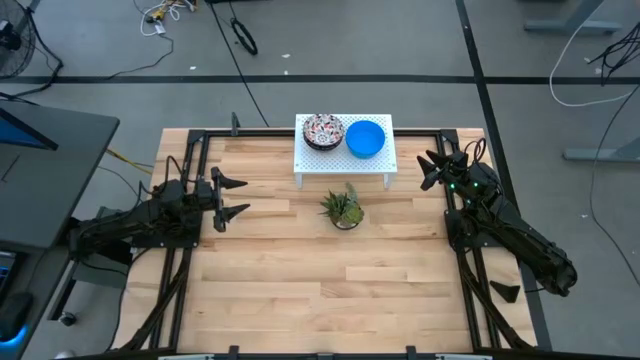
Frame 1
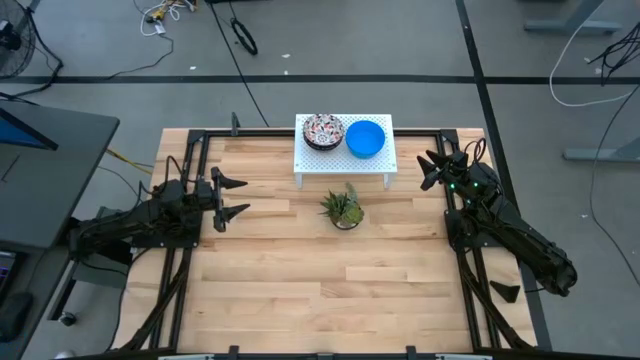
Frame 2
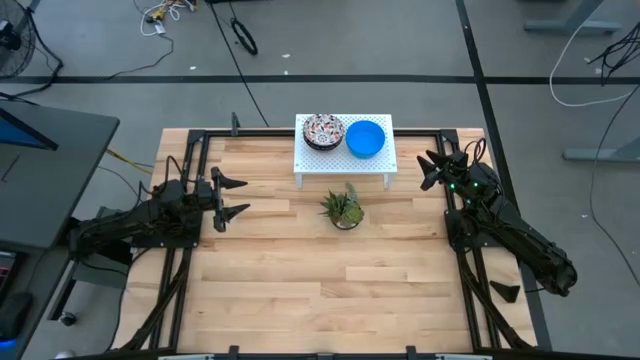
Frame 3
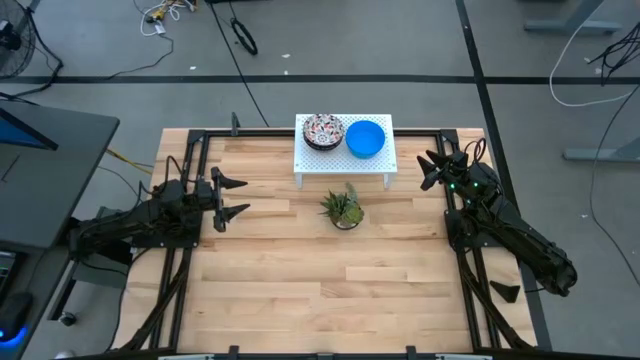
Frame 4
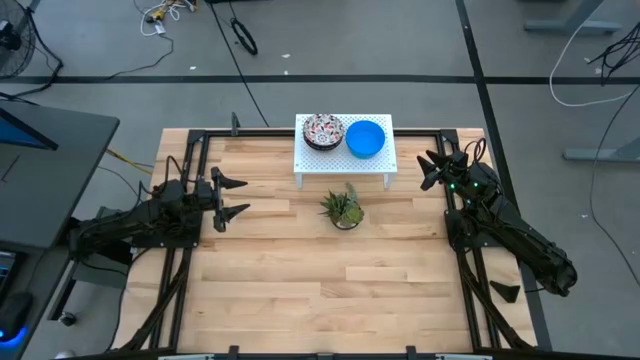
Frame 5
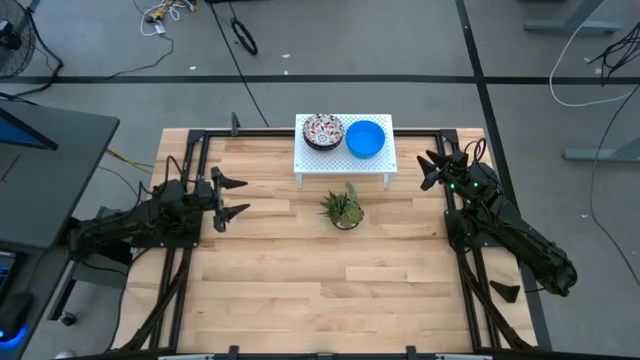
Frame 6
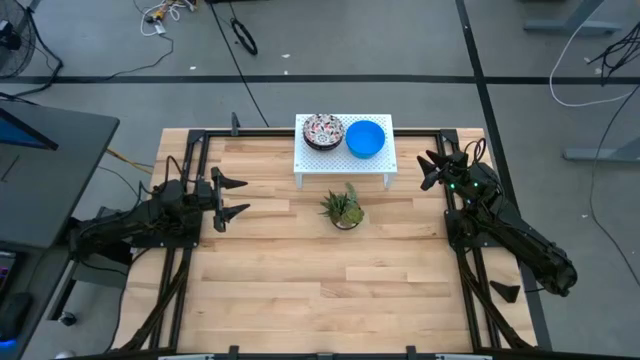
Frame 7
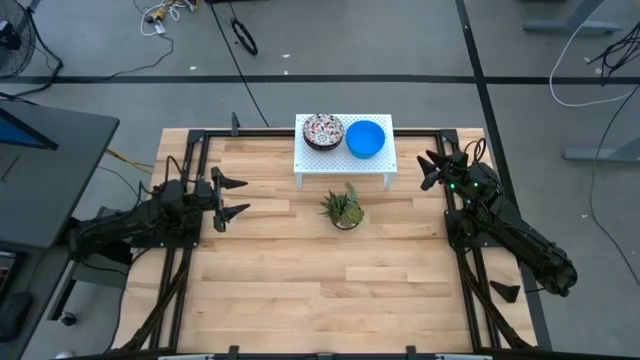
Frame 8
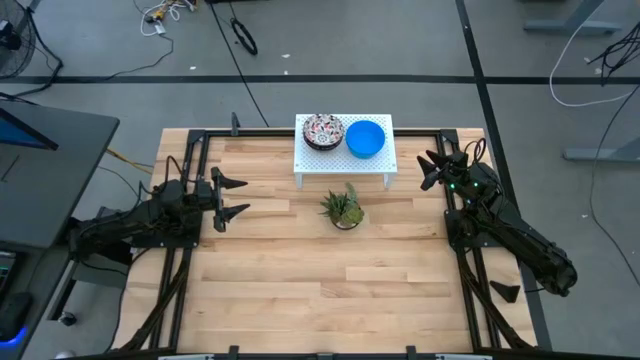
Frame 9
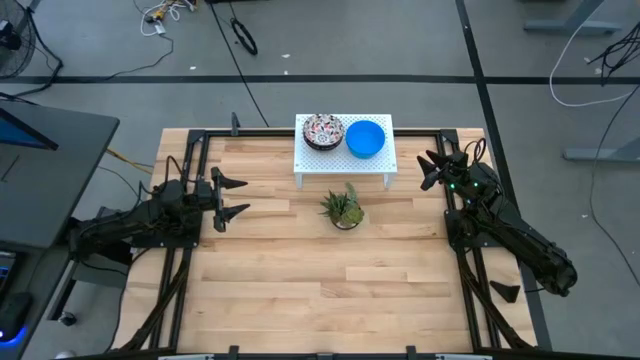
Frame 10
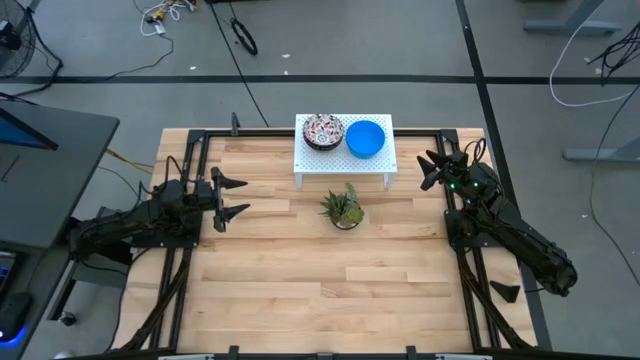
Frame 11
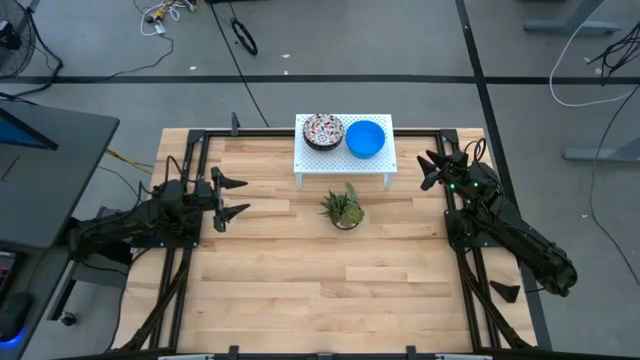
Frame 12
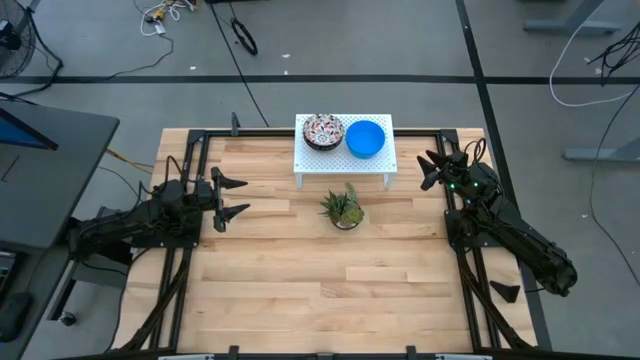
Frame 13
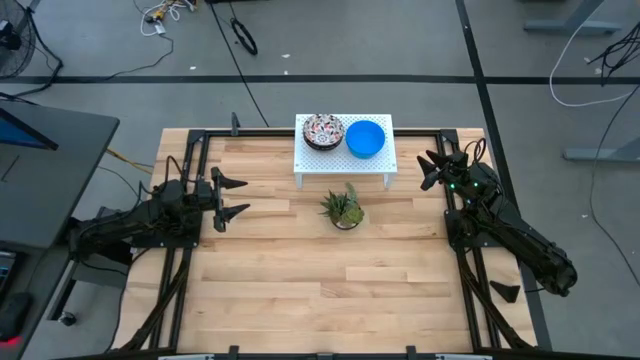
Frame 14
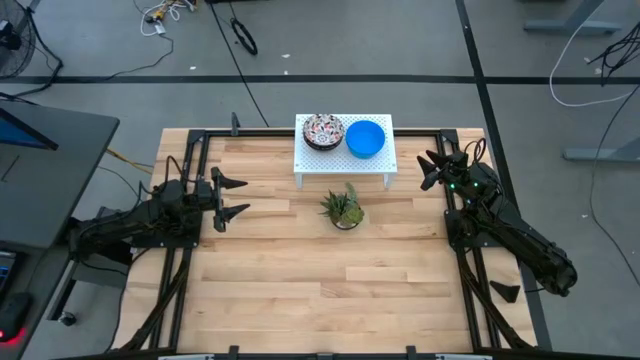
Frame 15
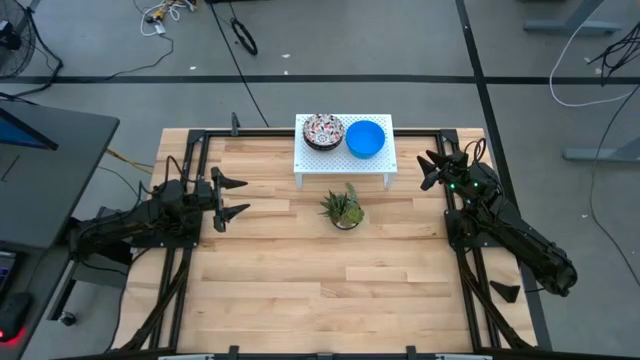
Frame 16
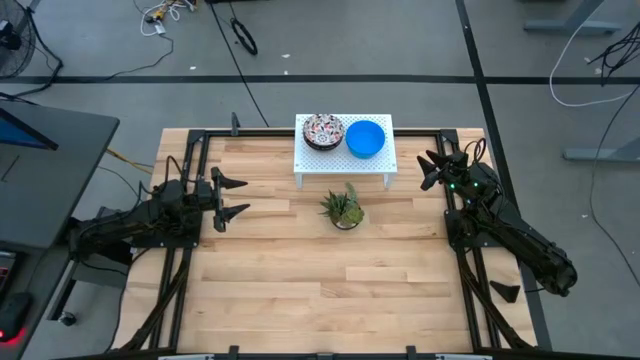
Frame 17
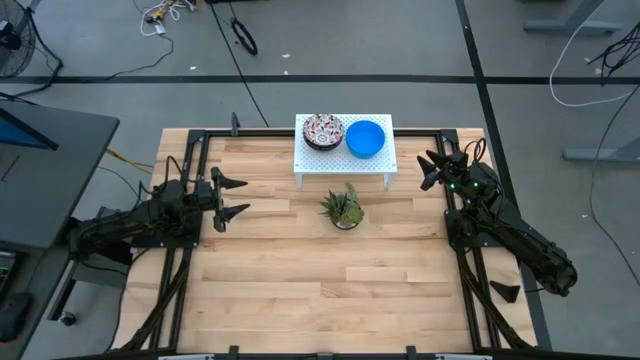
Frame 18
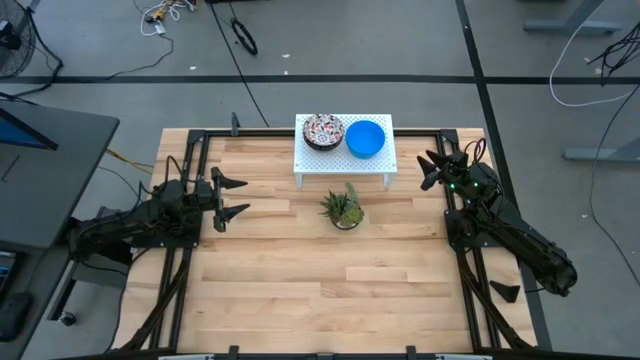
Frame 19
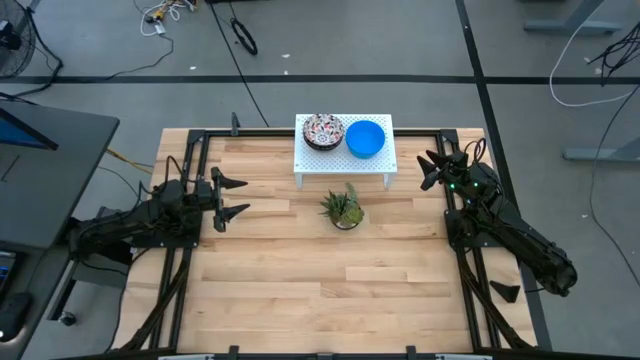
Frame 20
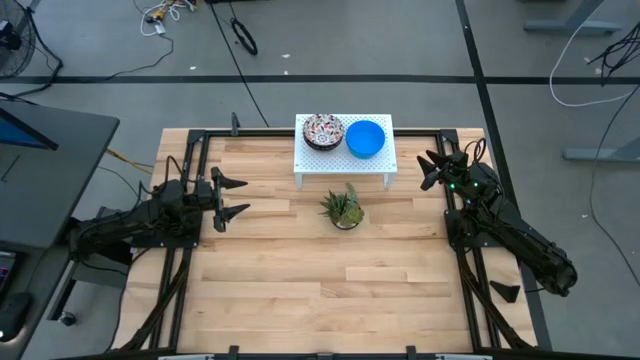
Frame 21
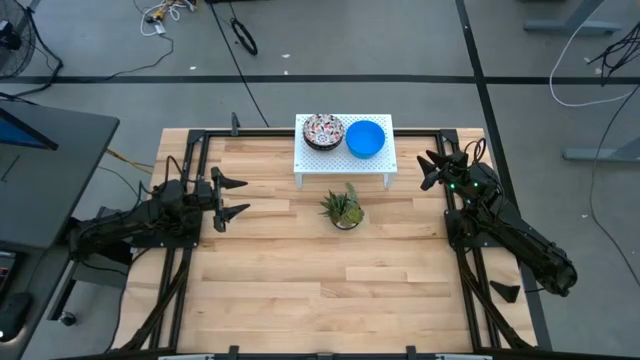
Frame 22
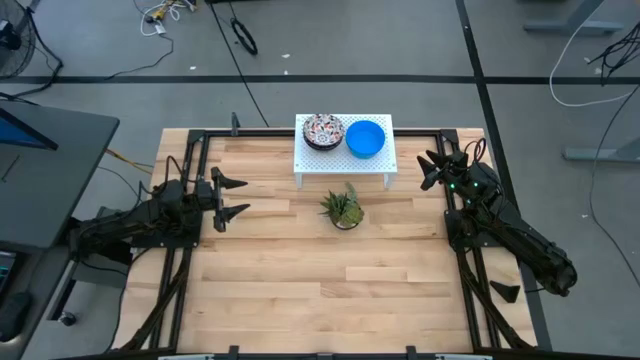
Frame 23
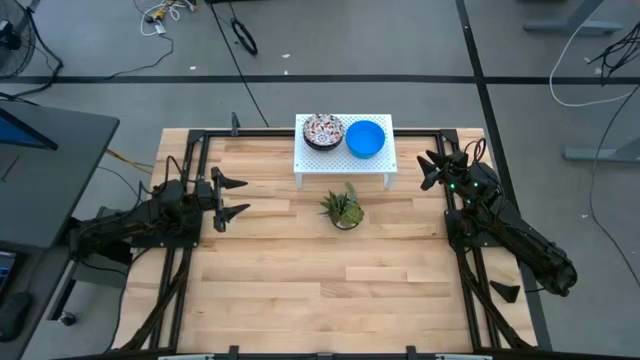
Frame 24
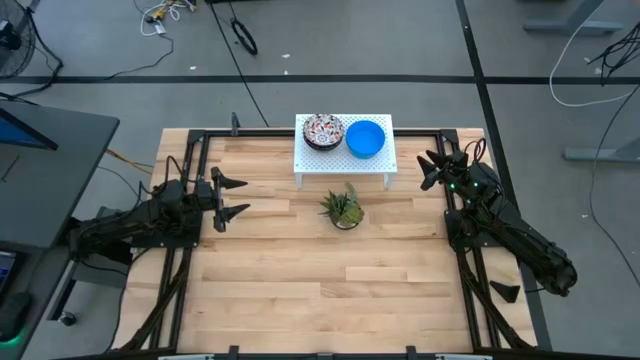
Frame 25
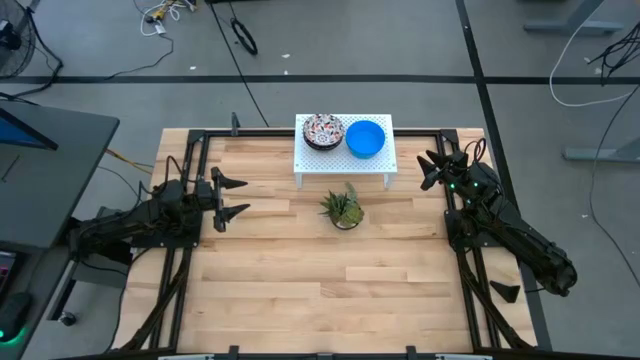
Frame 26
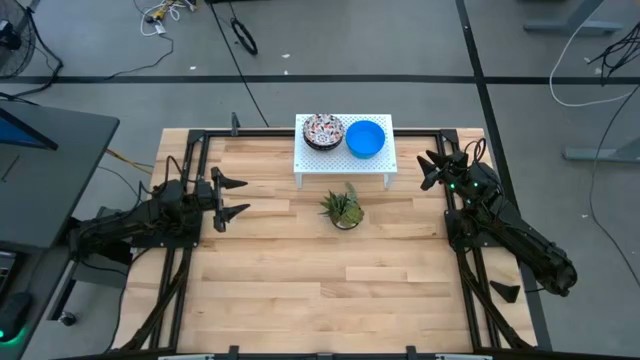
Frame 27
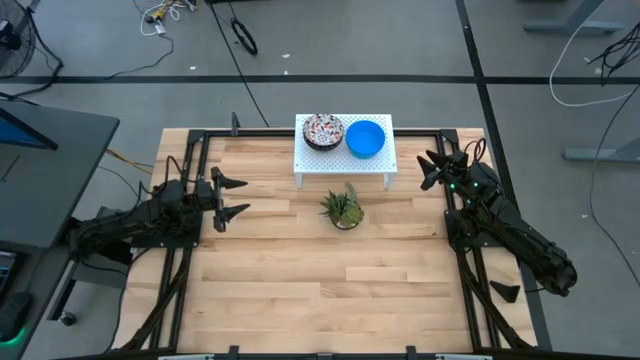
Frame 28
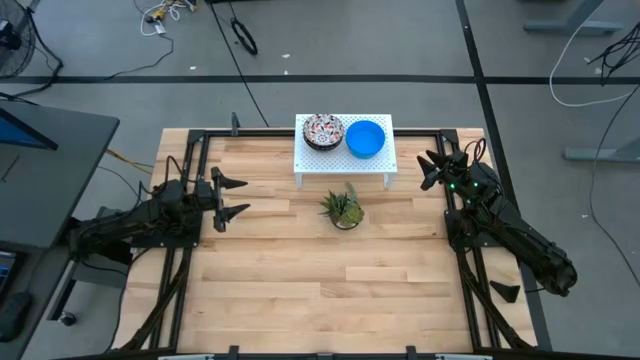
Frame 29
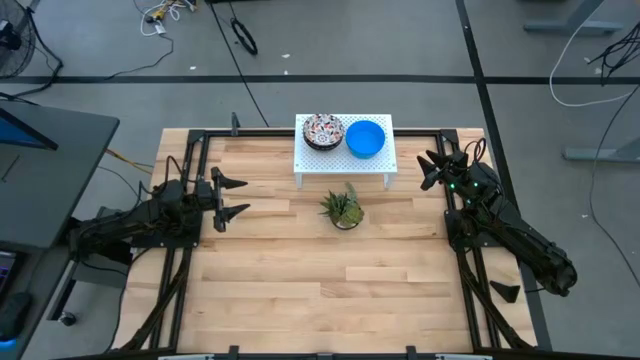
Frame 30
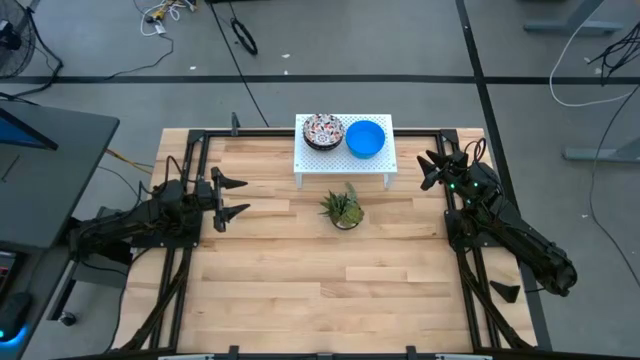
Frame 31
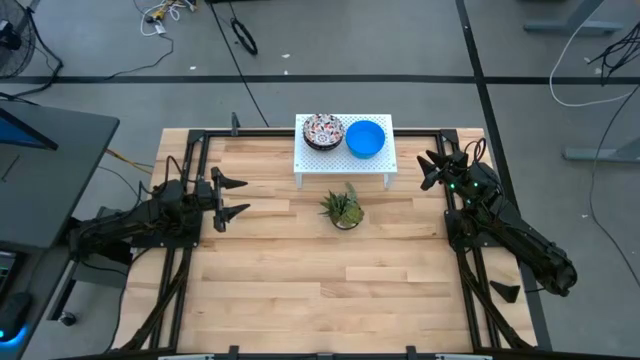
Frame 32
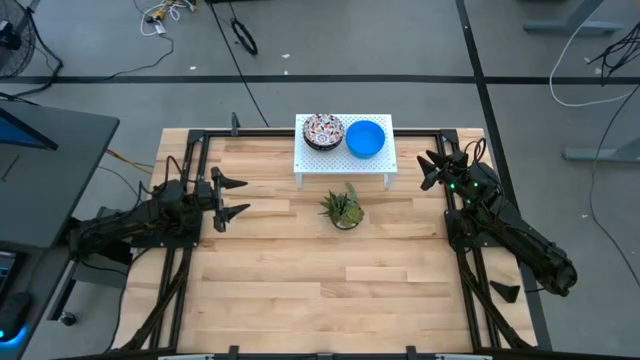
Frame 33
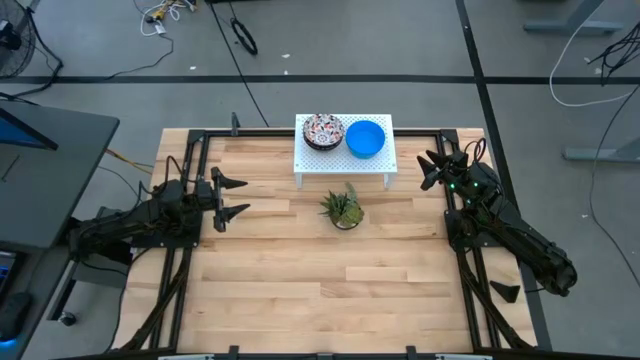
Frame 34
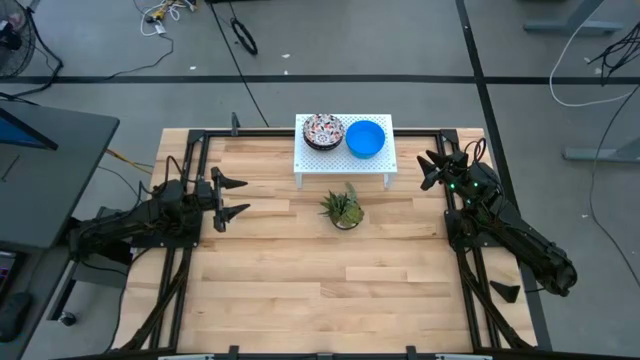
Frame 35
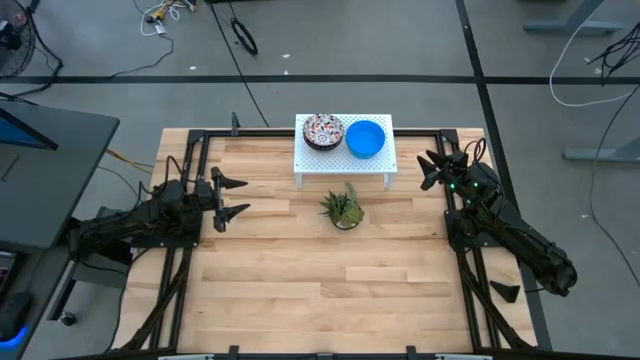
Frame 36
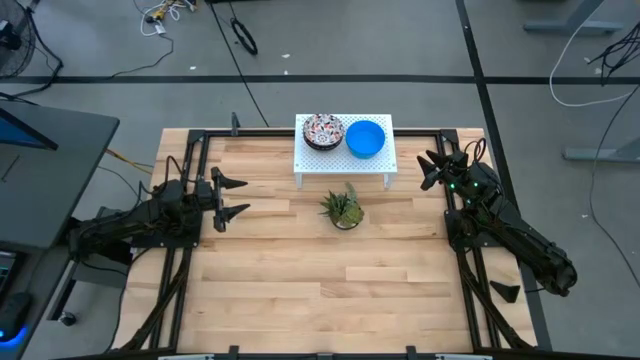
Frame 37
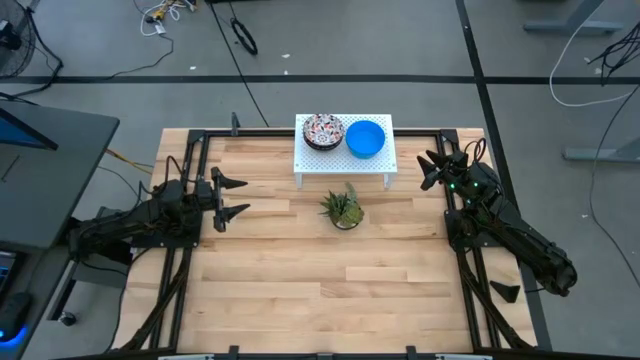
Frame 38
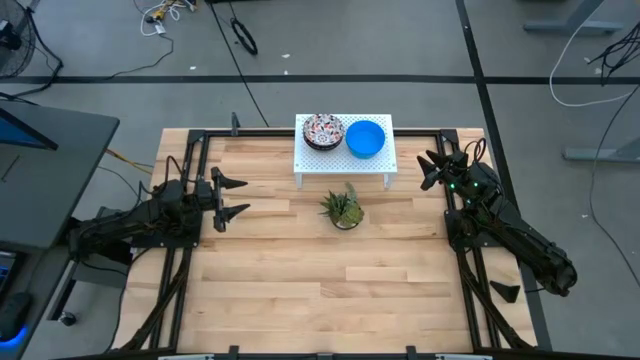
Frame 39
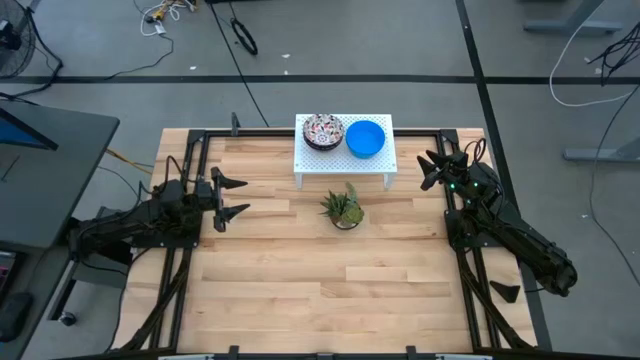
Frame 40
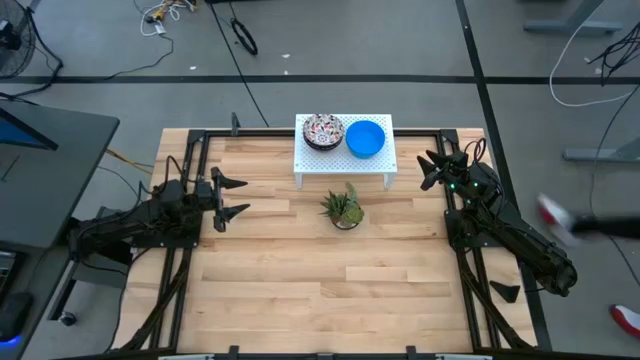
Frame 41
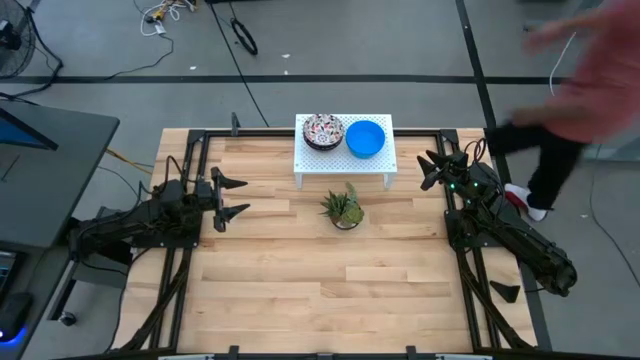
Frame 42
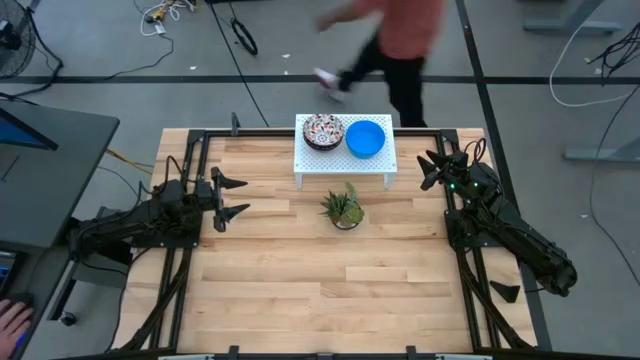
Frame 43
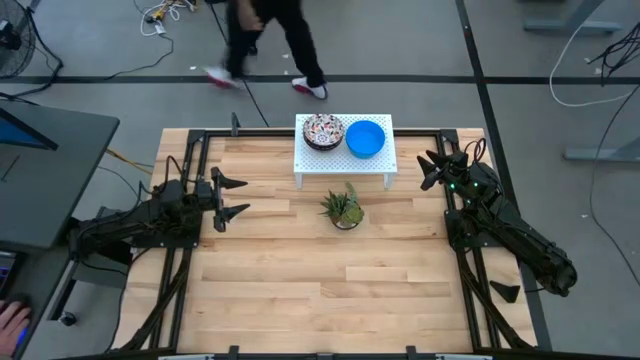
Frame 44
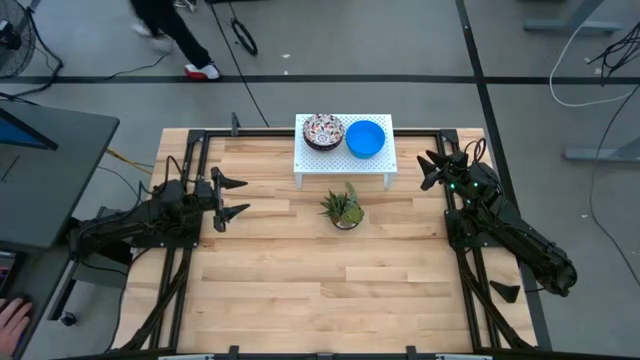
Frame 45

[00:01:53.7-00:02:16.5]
Task: Pick & Place Mini bowls
Return to Home Position
